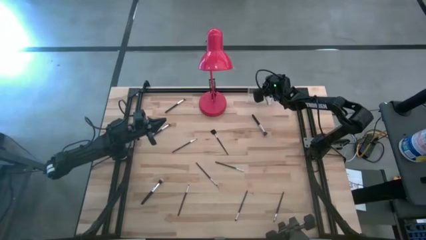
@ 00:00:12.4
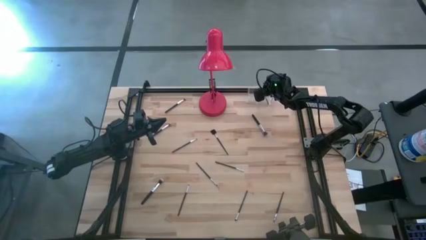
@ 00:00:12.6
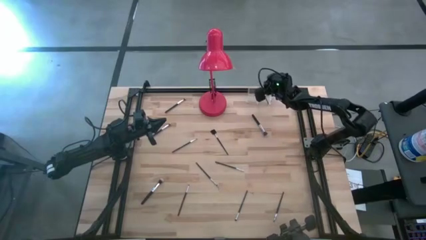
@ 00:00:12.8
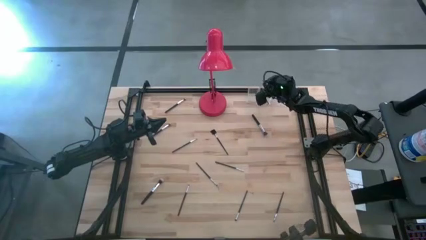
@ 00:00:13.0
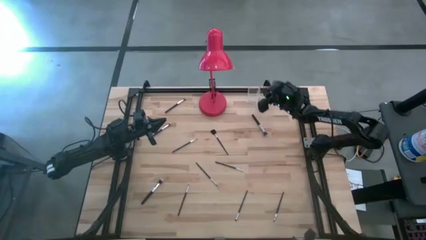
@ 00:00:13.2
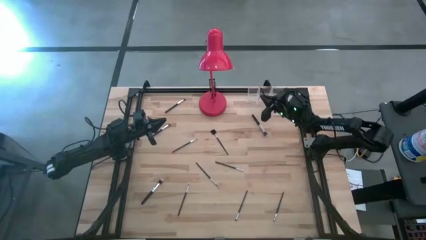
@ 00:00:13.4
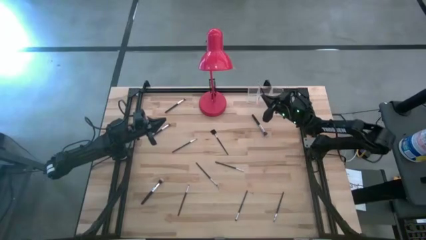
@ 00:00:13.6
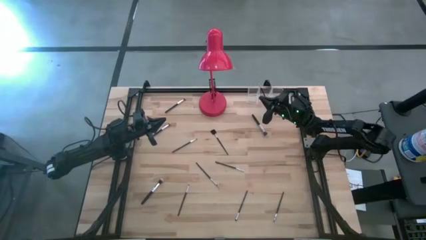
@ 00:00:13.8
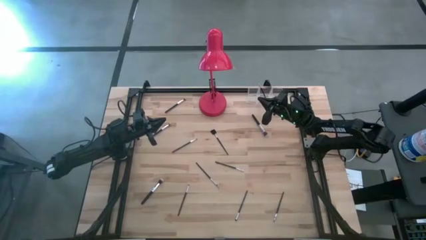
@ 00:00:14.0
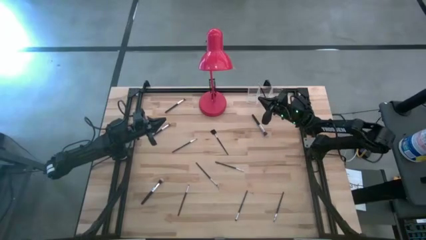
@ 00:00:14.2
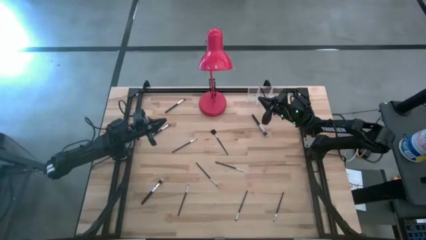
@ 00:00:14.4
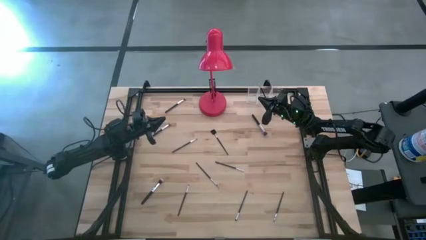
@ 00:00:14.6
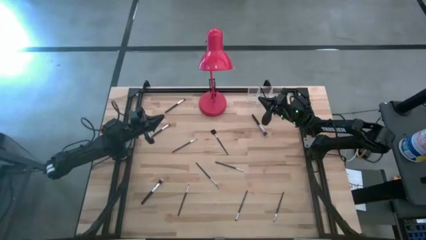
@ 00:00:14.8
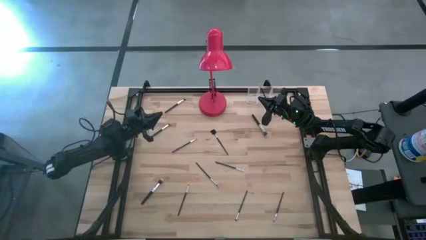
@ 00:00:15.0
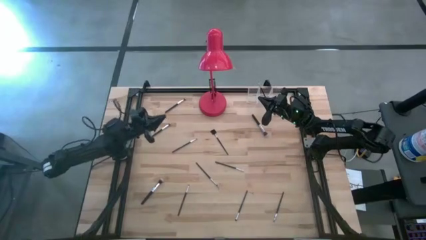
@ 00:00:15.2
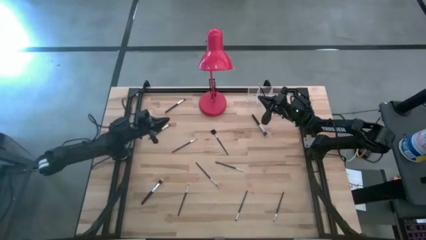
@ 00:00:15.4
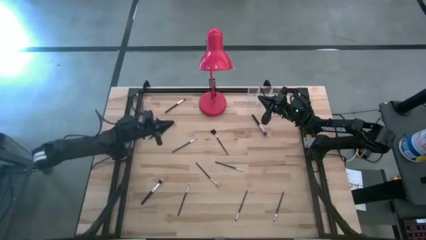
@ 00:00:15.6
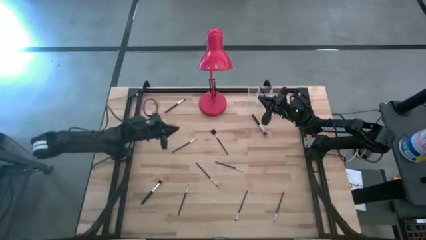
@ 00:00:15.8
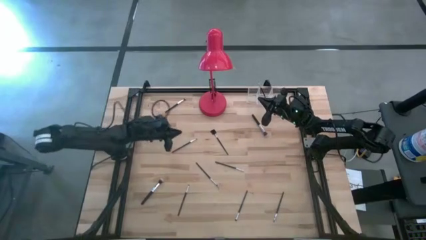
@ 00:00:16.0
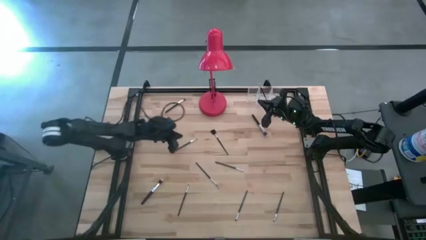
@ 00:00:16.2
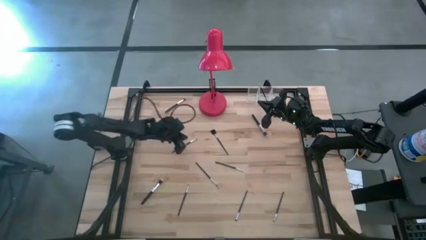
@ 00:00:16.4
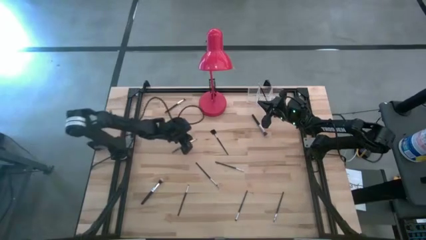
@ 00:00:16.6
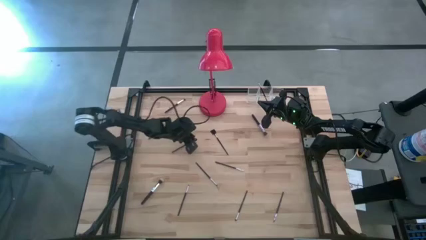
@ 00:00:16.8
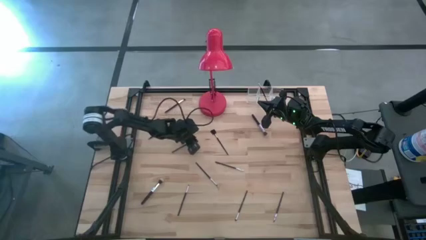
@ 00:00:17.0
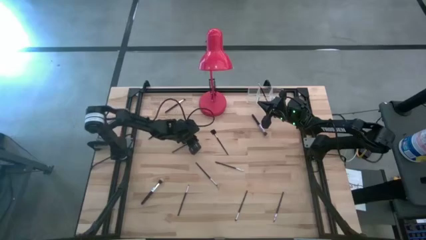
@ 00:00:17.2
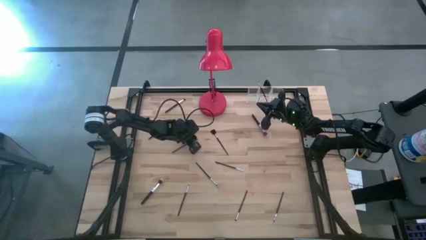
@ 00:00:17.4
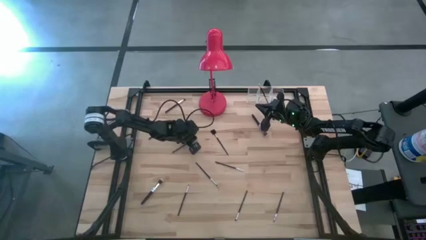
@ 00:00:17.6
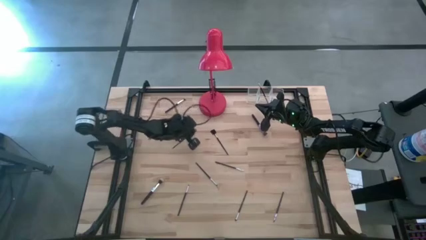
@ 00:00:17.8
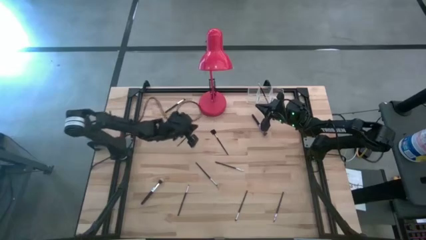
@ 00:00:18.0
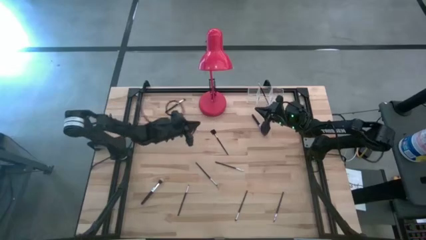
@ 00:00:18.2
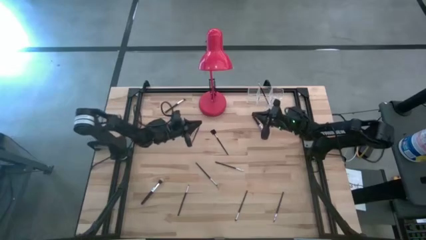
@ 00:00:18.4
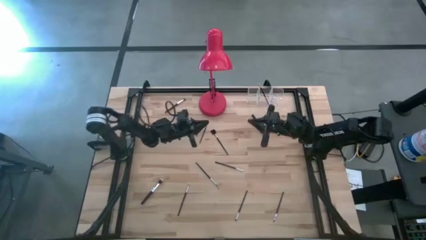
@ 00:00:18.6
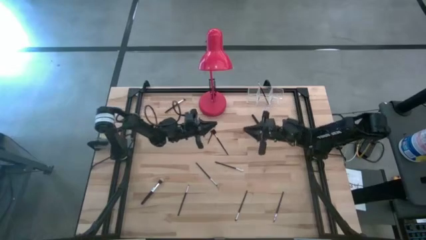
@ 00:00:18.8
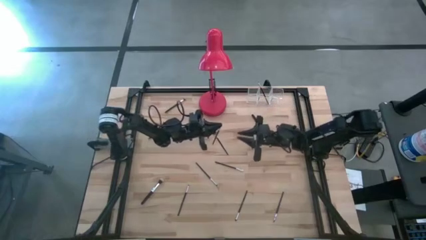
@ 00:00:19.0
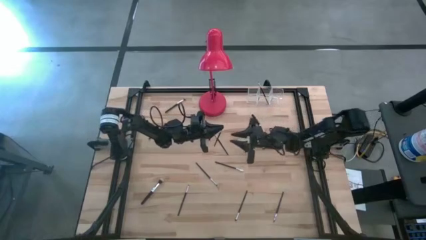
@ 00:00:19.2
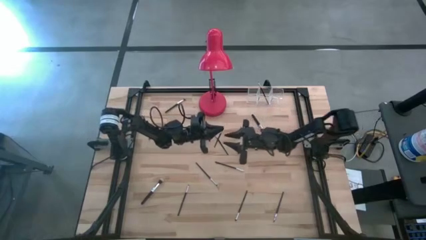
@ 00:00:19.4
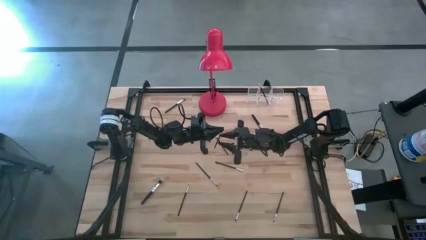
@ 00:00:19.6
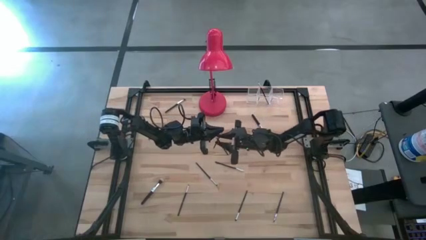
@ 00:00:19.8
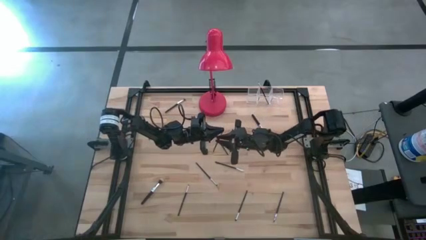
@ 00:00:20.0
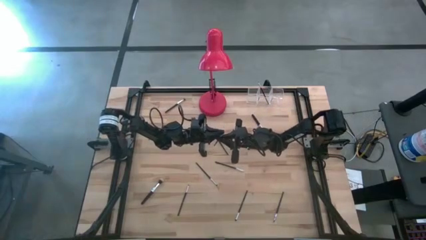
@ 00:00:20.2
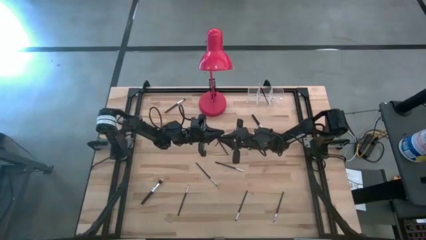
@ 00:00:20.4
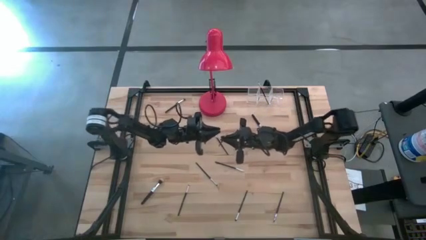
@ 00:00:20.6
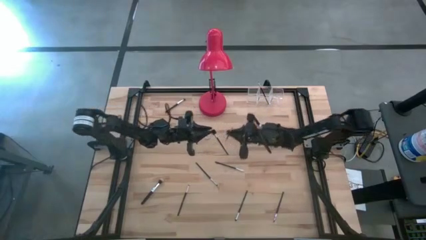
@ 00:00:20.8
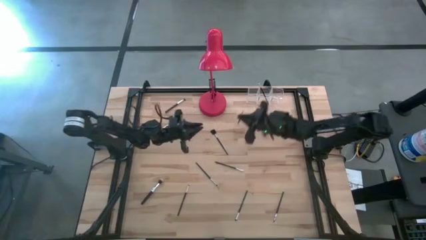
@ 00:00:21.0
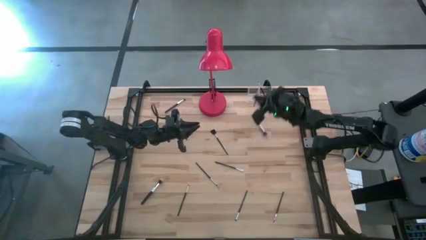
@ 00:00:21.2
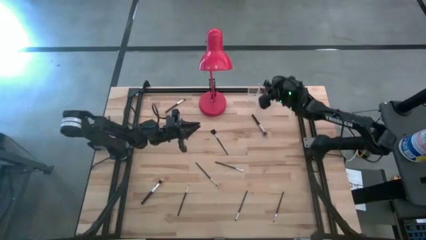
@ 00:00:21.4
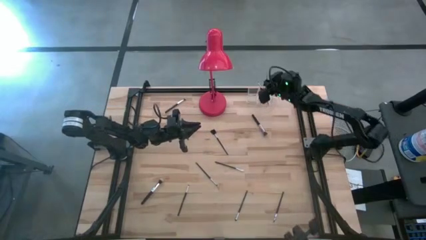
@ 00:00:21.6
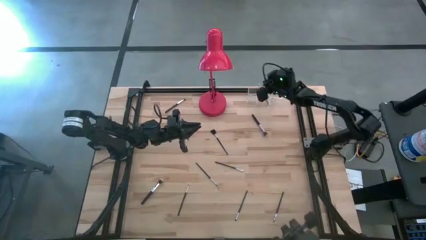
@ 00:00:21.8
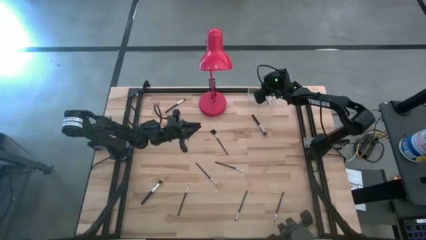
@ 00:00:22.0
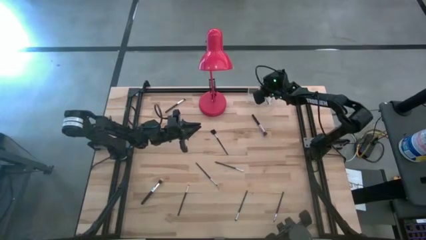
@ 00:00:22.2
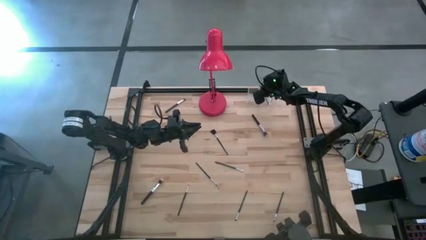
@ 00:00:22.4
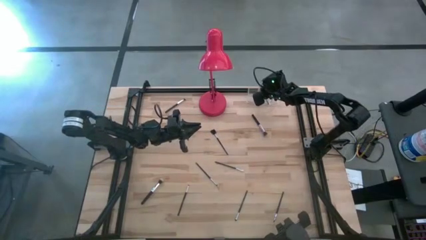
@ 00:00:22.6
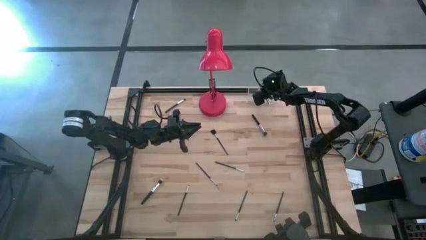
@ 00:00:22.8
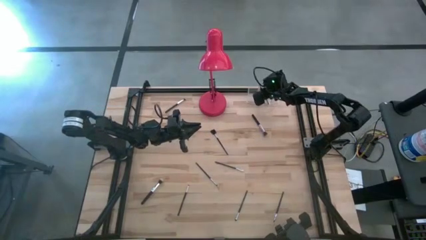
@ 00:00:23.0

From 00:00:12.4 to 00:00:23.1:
Task: Sort items
Put the black eyeshadow brush into the transparent organizer

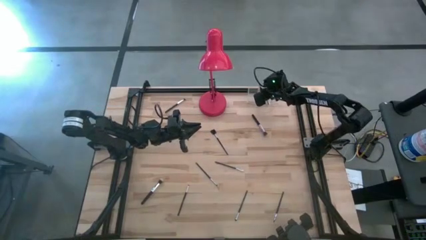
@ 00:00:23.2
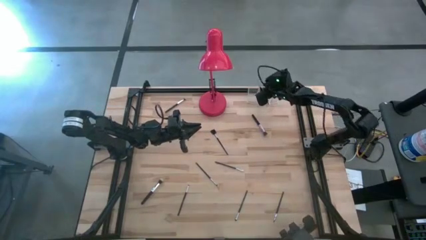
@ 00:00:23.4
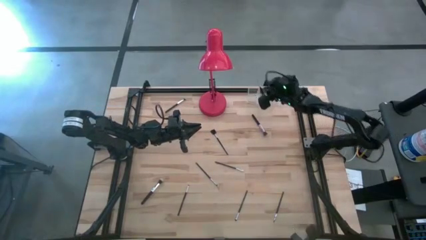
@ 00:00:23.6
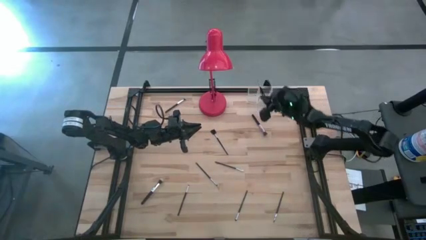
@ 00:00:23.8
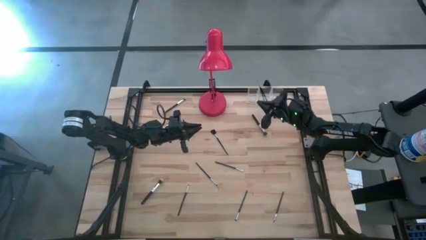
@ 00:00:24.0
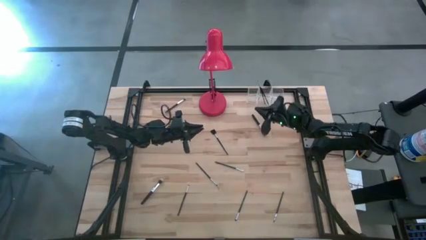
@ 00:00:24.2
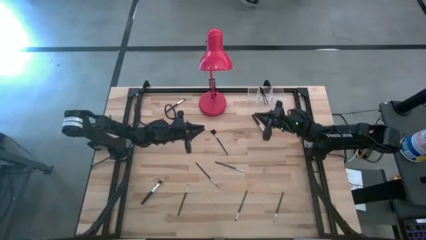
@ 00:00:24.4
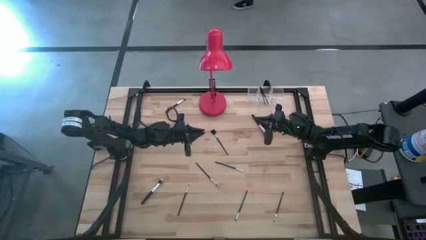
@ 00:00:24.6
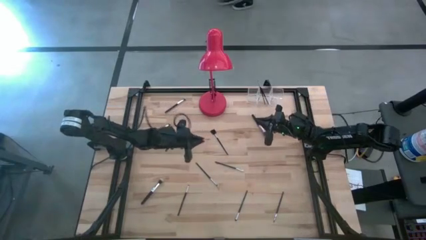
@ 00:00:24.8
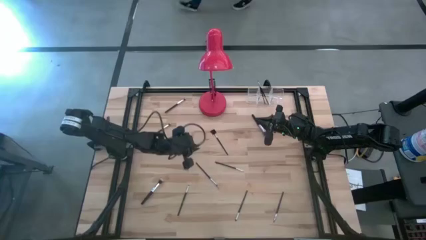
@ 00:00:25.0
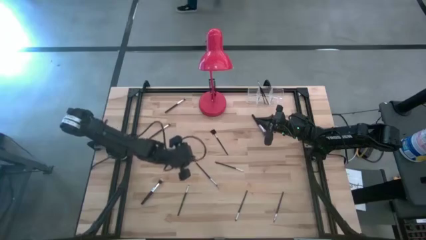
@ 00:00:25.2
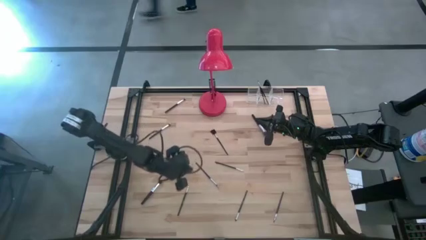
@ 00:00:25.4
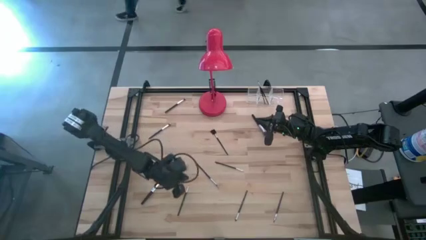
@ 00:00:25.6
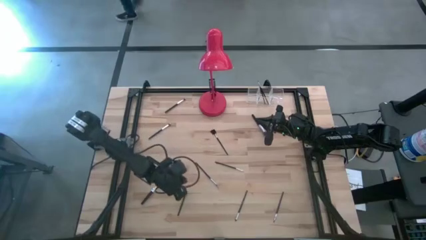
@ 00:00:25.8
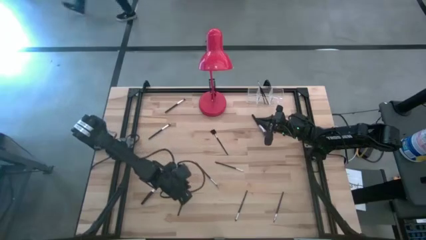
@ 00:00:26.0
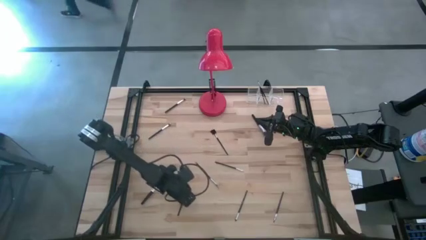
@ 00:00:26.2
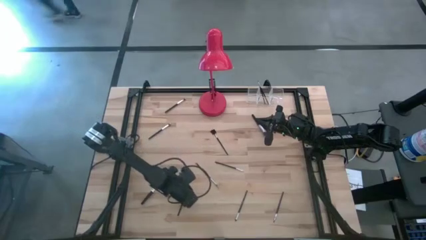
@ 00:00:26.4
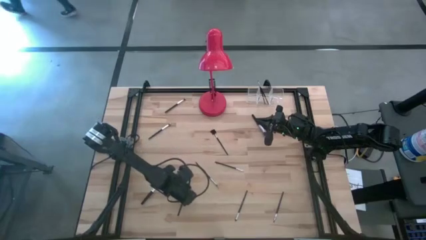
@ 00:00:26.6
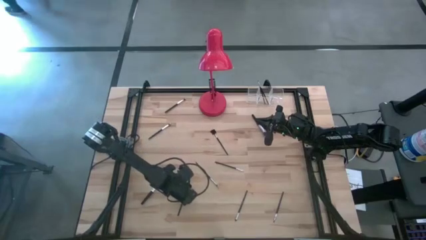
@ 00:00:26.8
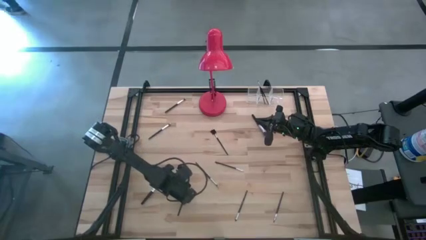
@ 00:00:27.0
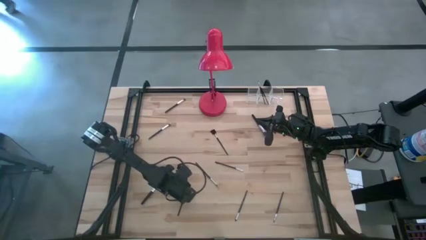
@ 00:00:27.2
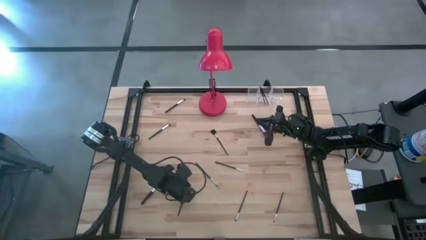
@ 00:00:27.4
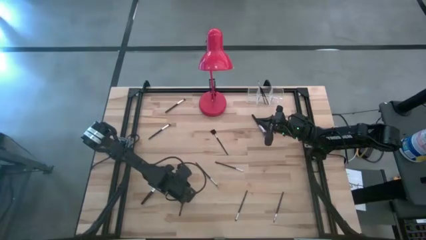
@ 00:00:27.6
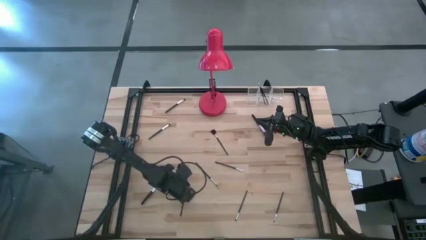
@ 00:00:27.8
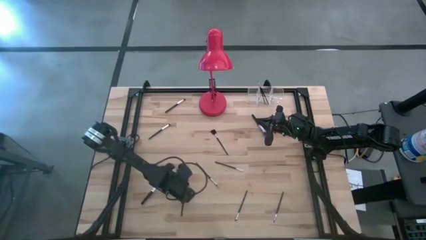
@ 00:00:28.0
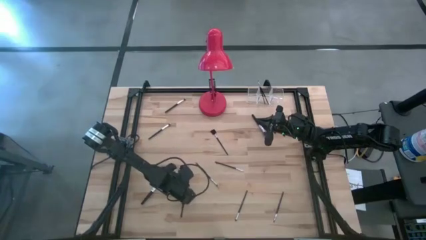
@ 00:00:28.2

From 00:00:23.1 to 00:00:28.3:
Put the black eyeshadow brush into the transparent organizer
